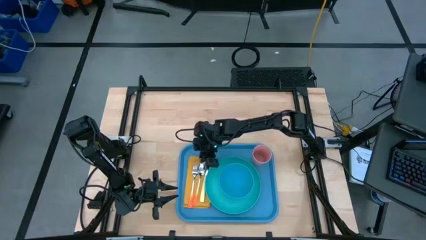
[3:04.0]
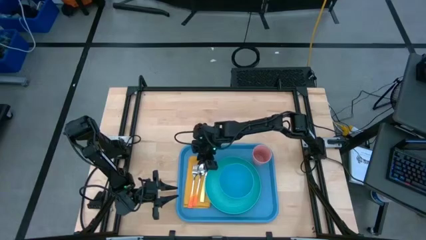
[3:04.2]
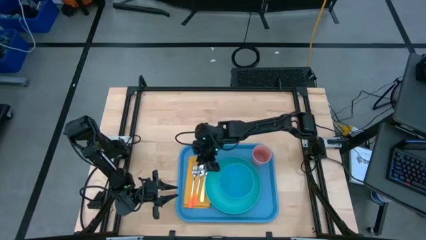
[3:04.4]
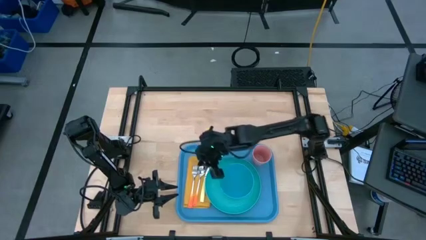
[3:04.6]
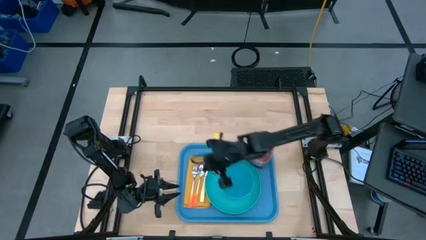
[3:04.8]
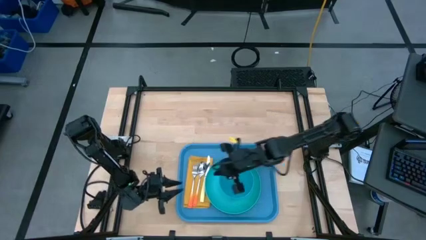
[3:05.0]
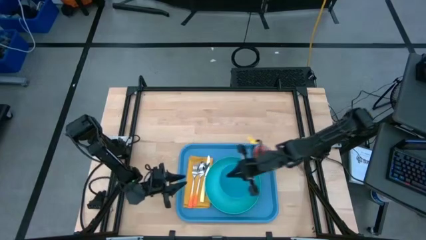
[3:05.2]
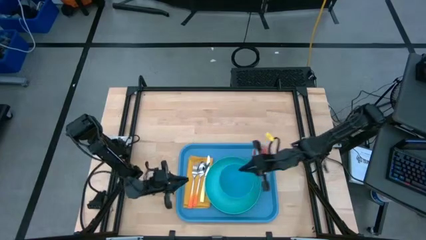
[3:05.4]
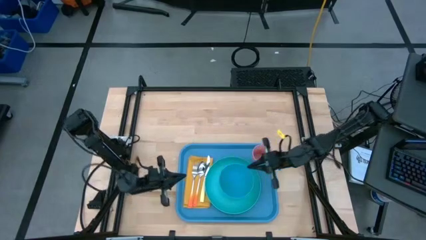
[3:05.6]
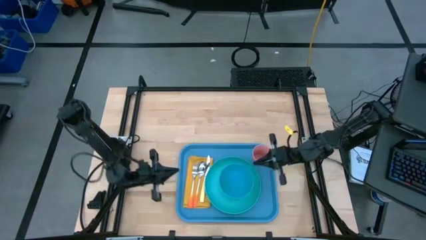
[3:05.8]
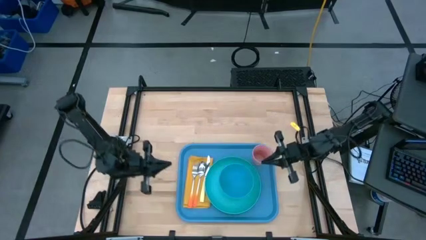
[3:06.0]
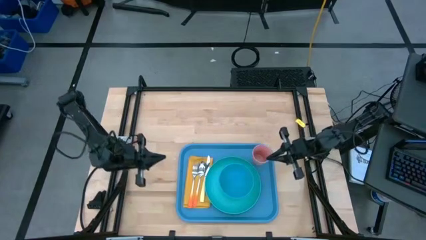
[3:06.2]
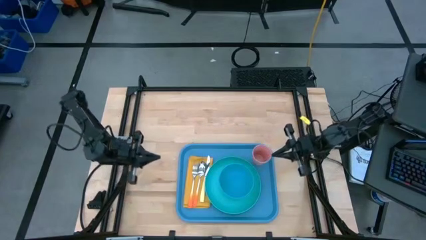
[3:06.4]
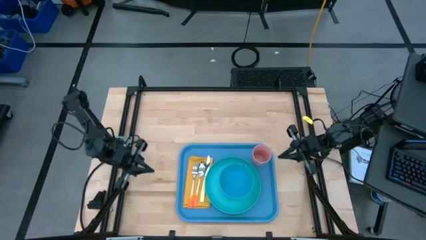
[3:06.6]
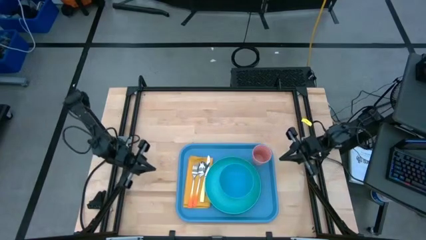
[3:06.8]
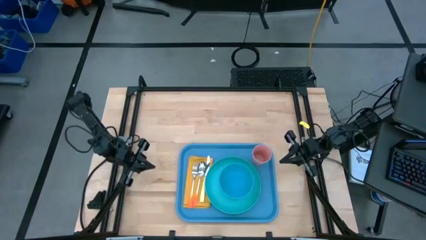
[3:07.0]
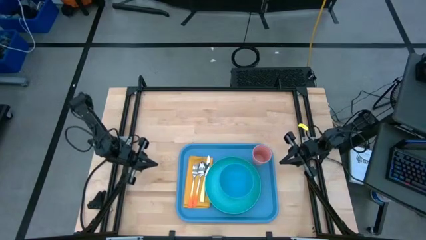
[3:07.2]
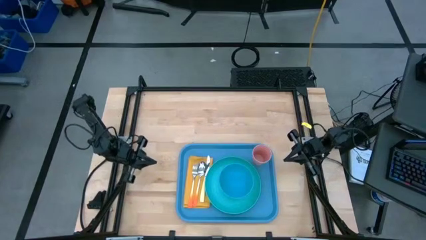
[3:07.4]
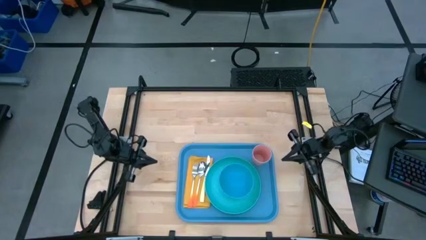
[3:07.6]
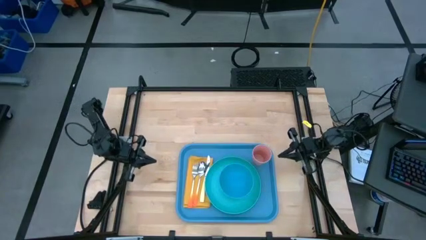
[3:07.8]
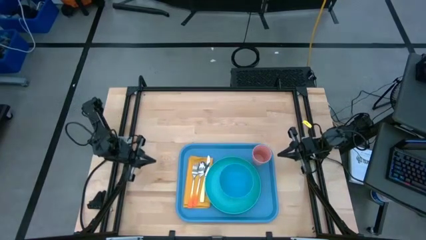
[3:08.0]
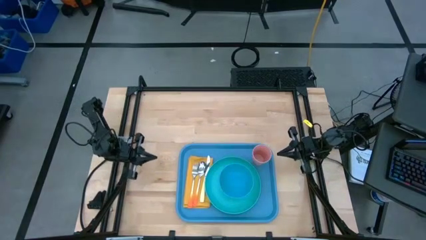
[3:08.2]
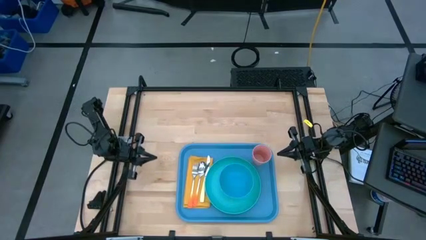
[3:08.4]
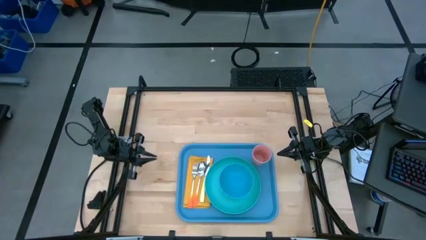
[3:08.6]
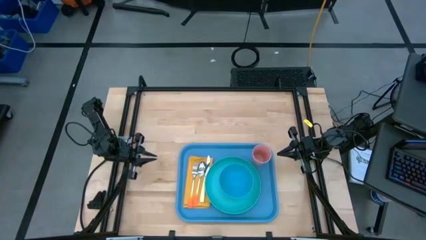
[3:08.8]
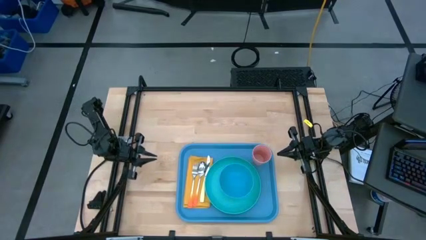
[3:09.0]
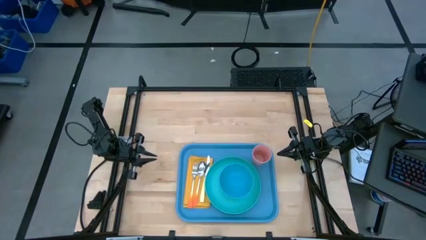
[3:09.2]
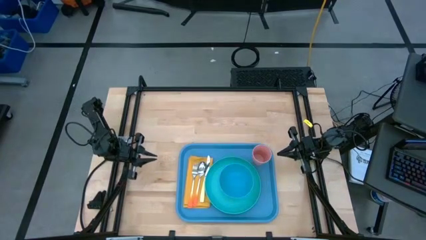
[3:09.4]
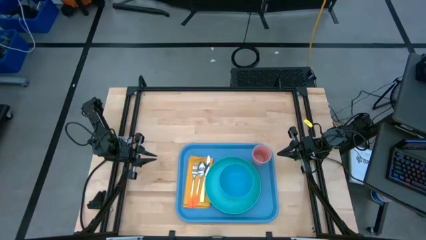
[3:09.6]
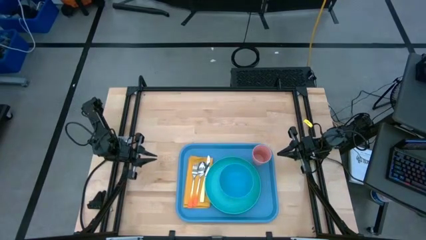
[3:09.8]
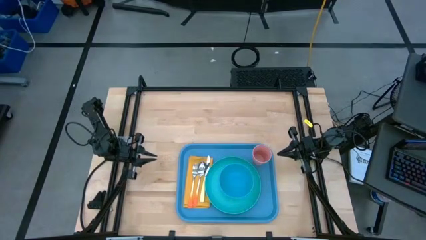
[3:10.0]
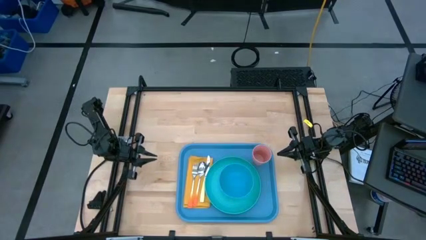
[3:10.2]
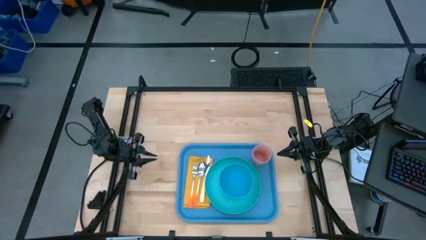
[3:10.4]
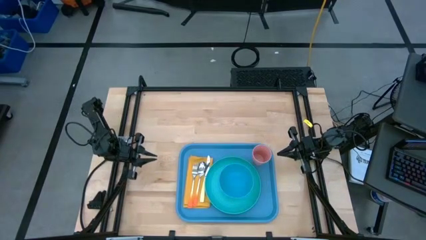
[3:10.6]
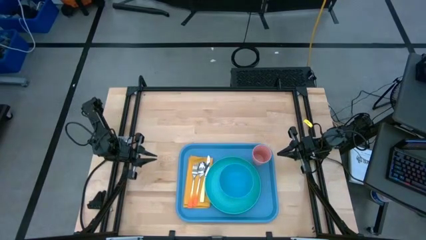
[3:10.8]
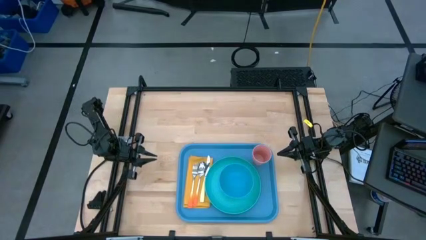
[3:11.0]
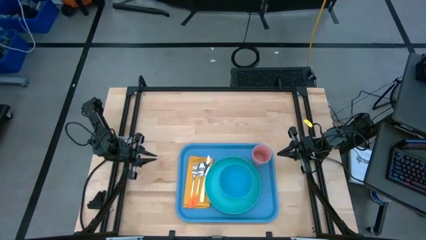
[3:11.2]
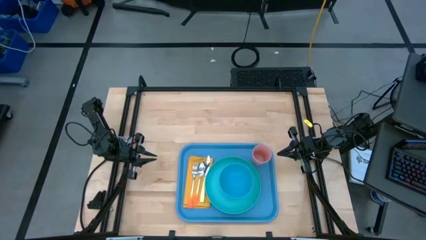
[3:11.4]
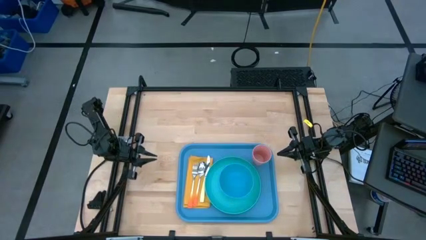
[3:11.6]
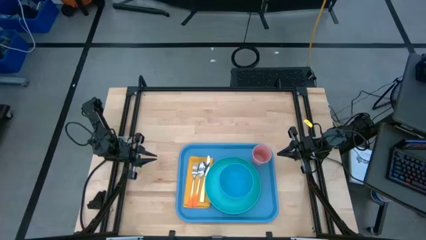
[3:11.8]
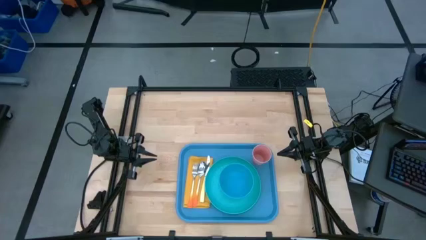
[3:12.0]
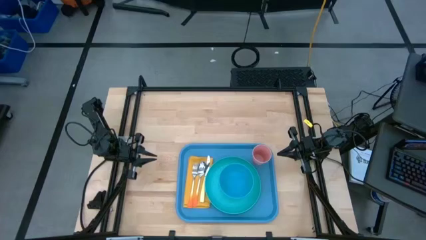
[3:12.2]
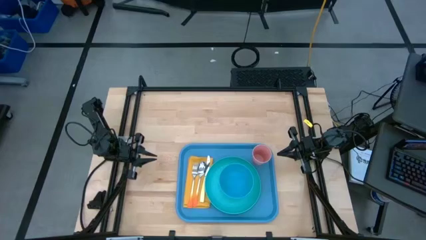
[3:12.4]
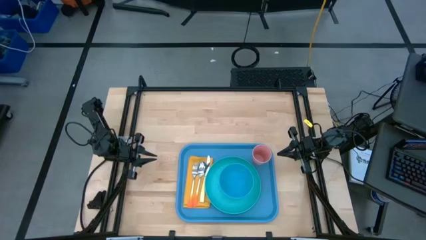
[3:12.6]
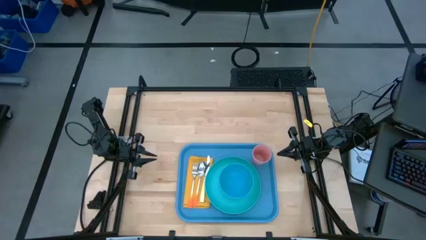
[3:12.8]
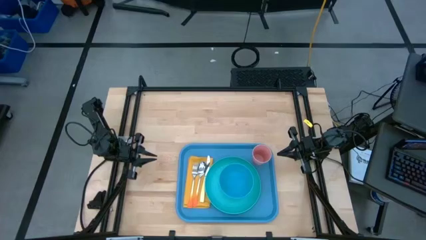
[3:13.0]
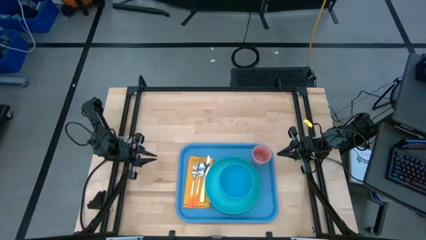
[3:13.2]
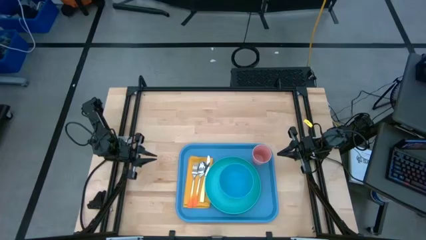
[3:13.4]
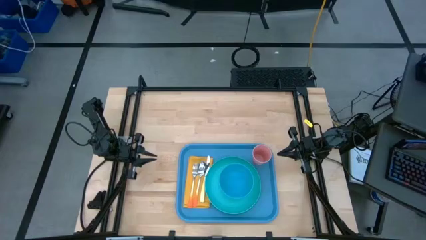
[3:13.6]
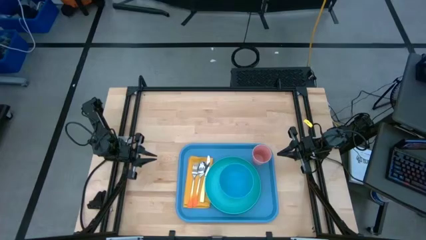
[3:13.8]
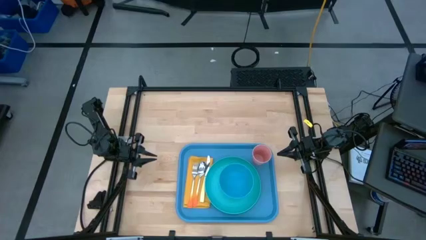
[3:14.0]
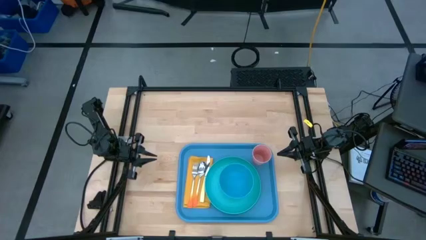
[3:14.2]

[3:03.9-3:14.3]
Task: Set up tray
Return to Home Position

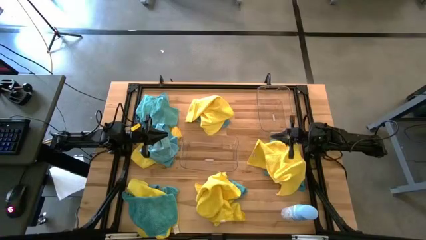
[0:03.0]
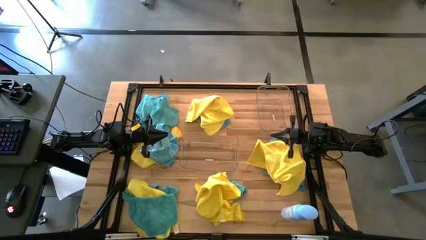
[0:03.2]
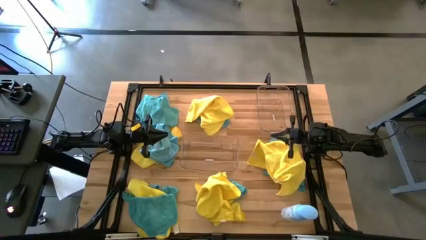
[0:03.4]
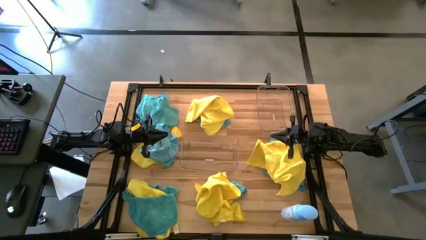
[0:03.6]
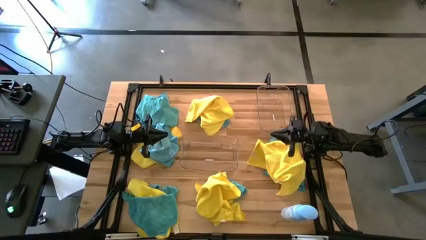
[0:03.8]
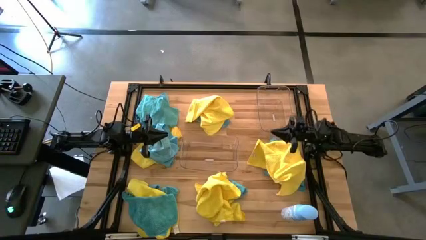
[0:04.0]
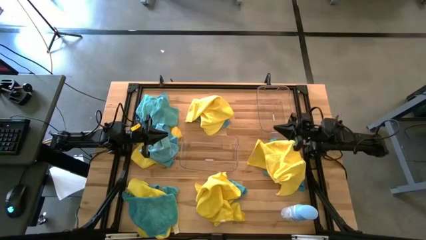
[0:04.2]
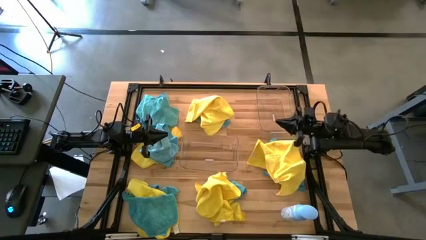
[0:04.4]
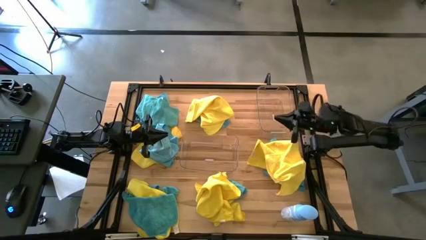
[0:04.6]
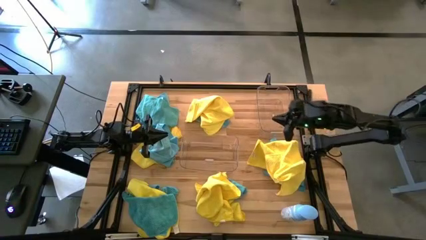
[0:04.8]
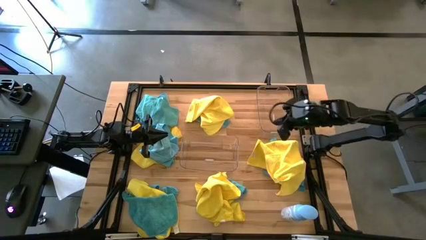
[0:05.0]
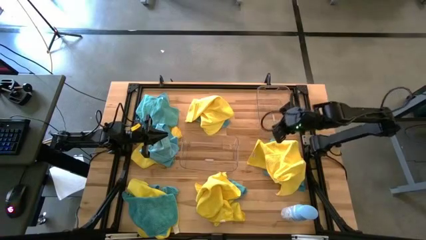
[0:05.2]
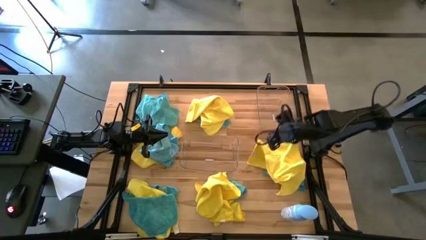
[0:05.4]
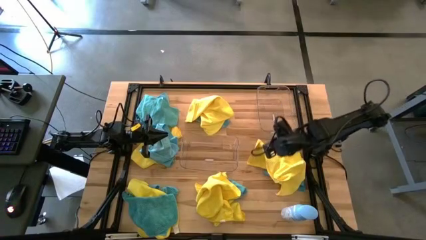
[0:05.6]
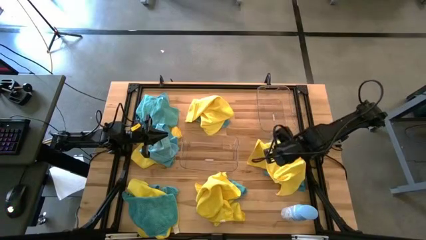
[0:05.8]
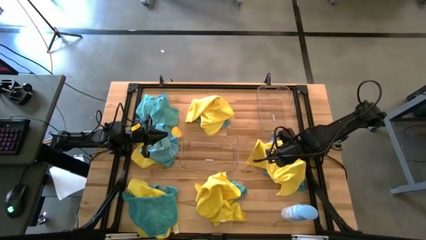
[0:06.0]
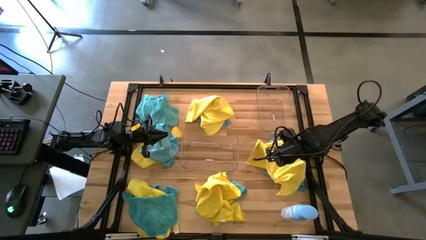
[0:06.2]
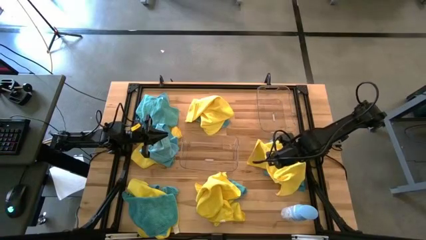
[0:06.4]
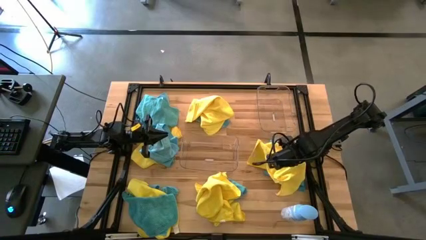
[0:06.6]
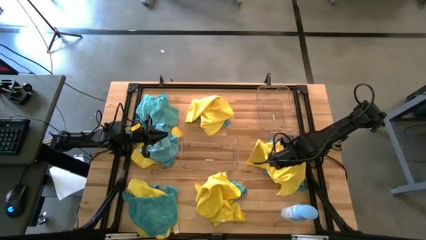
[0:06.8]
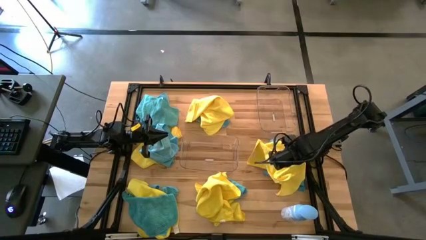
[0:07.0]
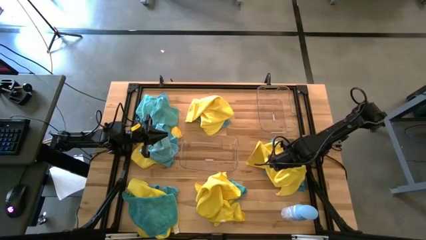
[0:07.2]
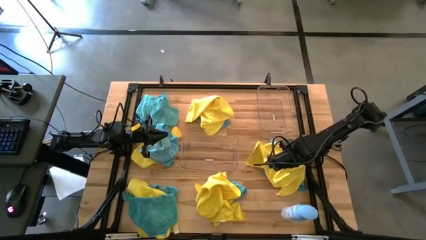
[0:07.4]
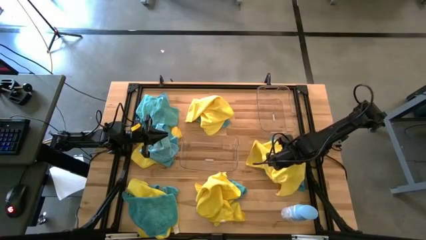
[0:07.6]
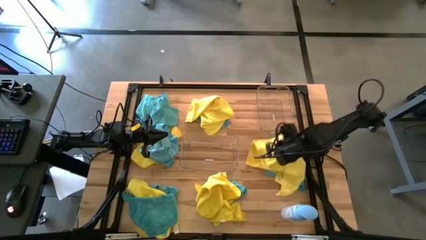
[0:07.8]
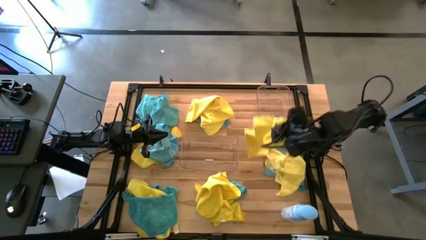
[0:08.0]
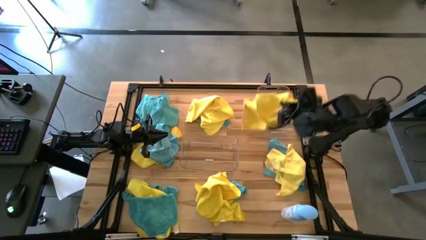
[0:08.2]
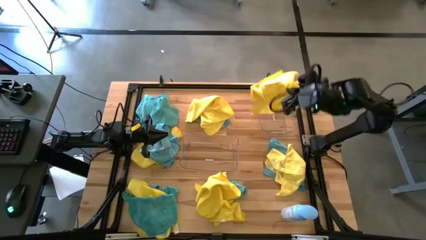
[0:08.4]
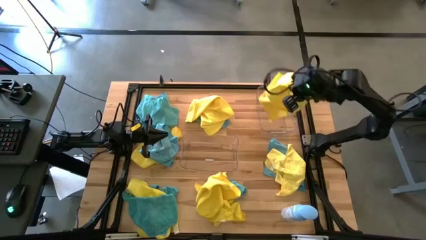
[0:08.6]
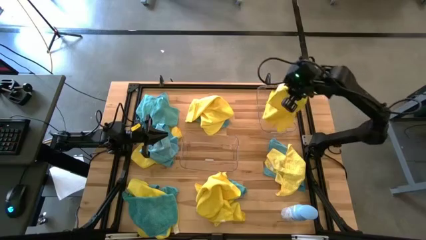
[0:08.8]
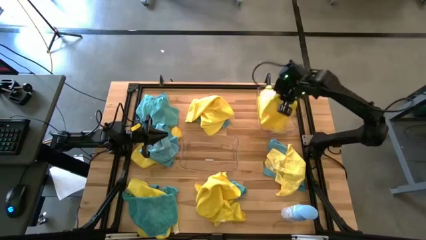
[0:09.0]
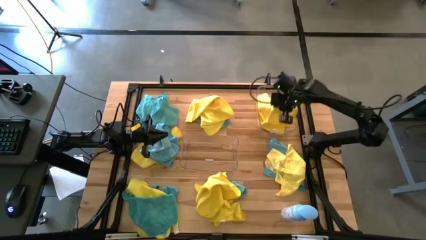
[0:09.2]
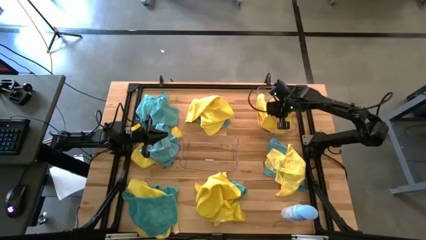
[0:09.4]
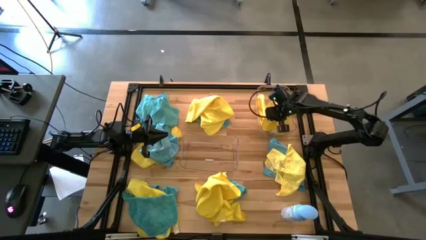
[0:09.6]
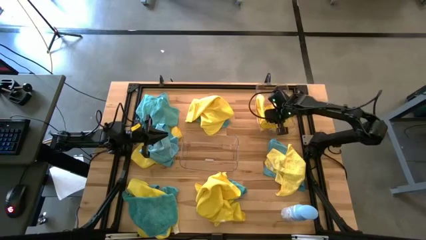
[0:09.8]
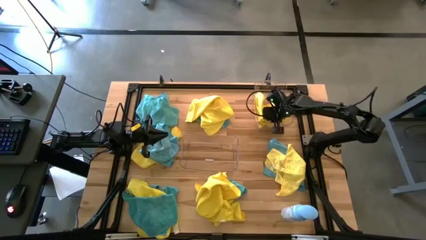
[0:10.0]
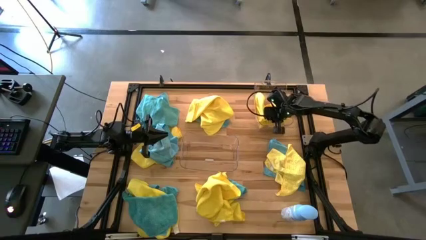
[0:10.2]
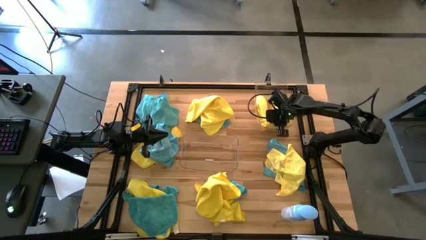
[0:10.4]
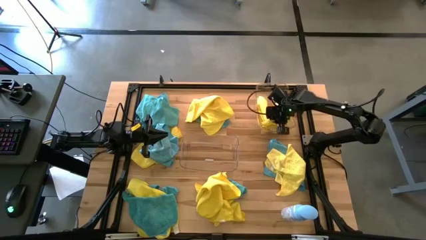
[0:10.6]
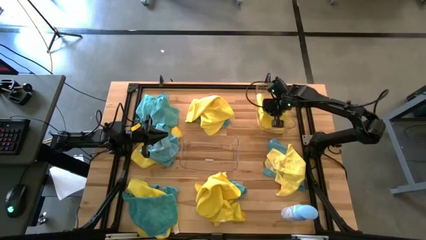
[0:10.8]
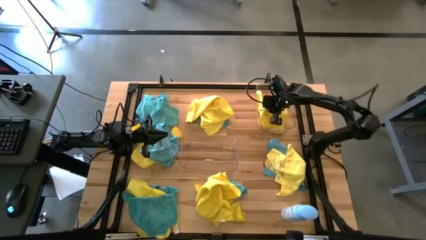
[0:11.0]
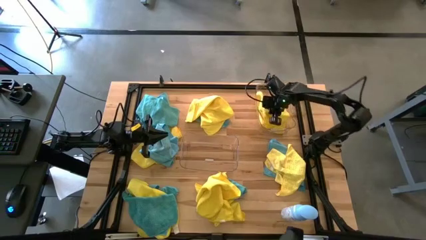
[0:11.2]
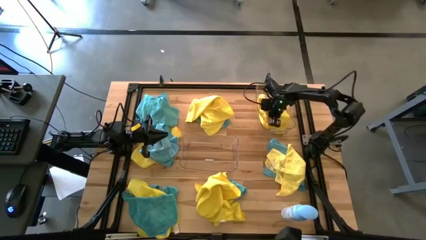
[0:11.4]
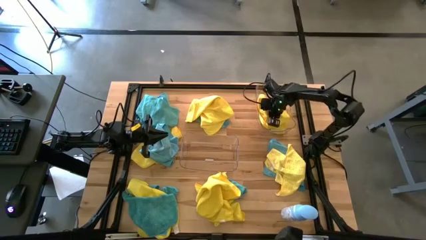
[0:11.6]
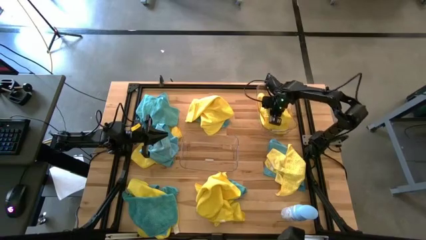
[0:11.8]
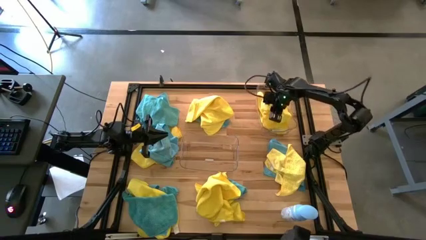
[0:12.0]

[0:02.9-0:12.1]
Task: Sort microfiber towel by color & place in baskets
Put the yellow towel into the top transparent bin
